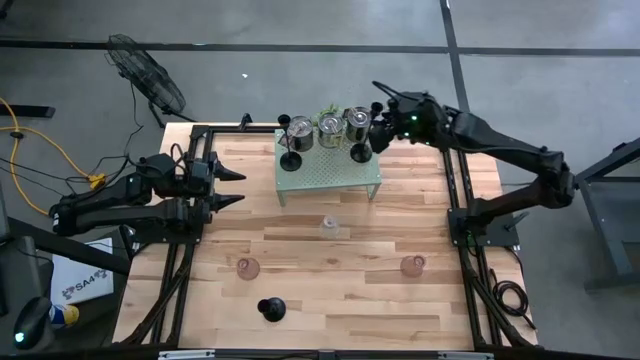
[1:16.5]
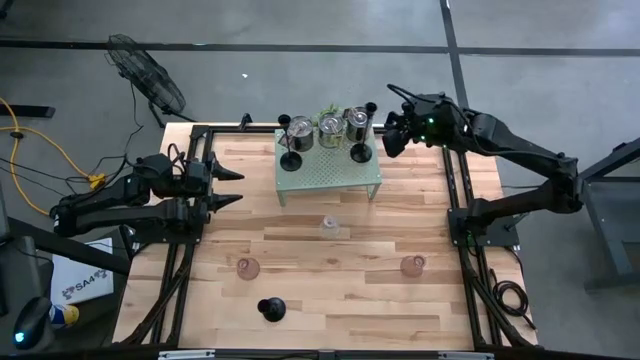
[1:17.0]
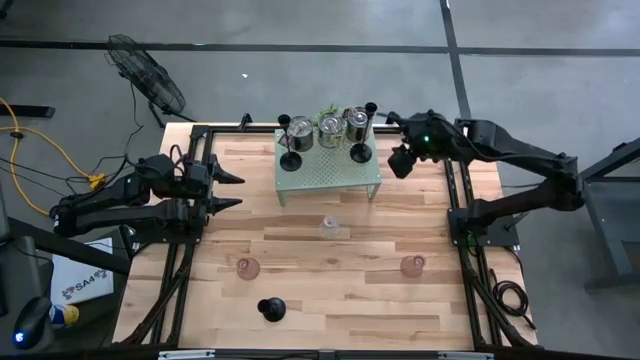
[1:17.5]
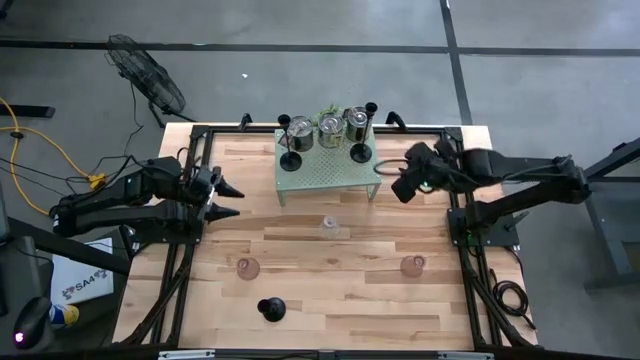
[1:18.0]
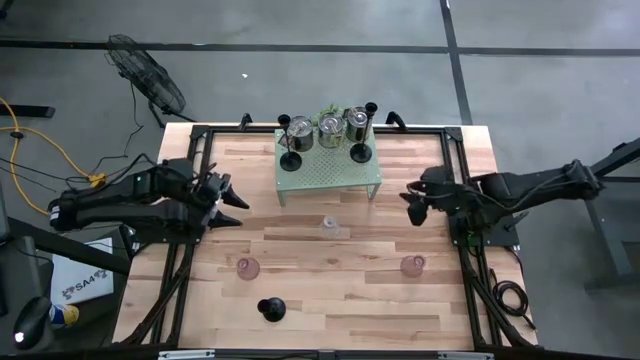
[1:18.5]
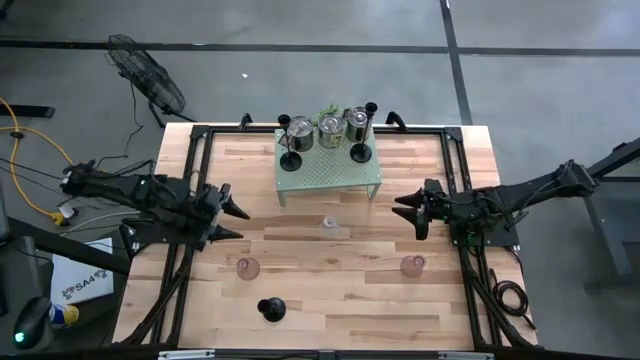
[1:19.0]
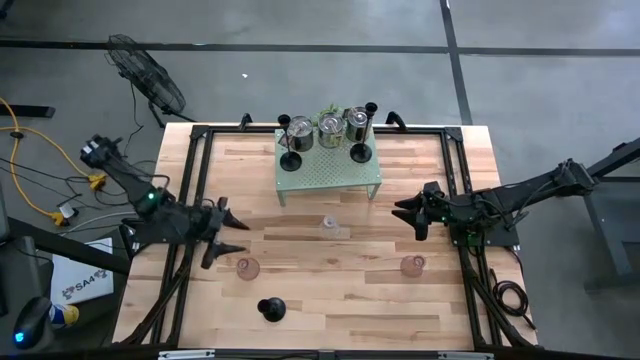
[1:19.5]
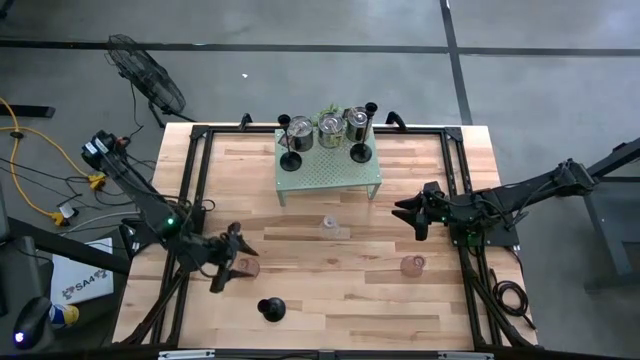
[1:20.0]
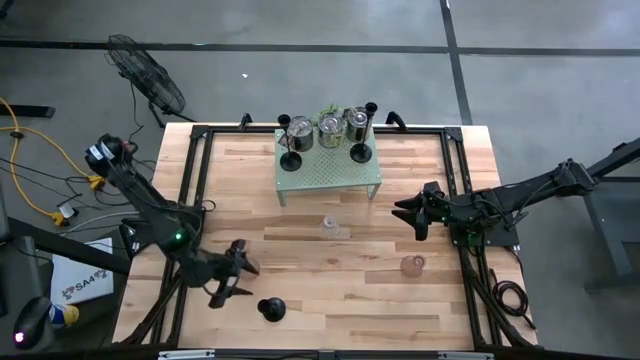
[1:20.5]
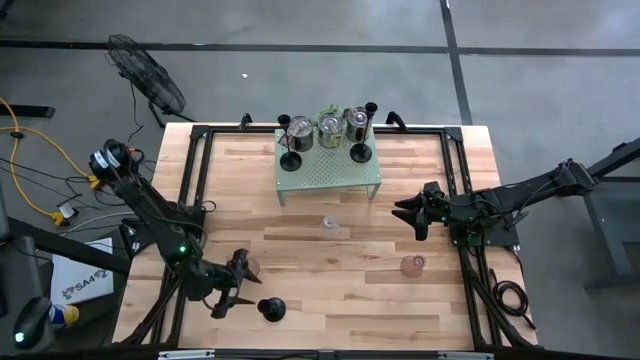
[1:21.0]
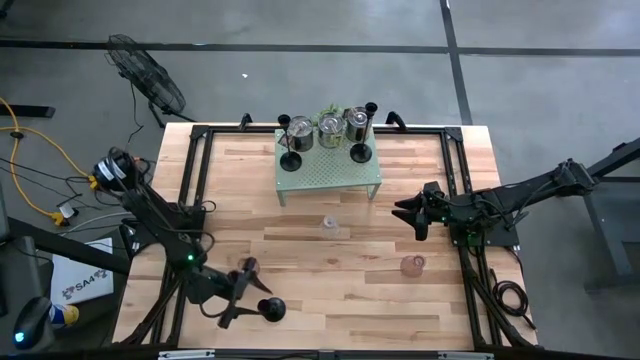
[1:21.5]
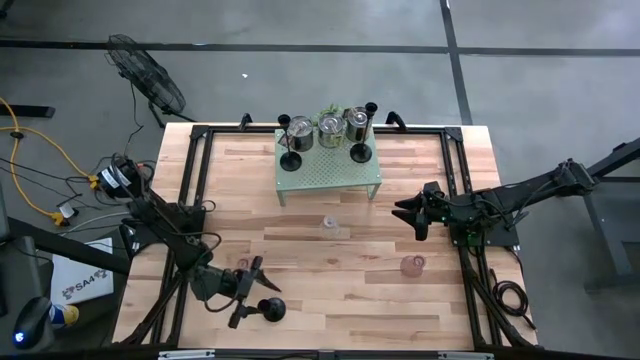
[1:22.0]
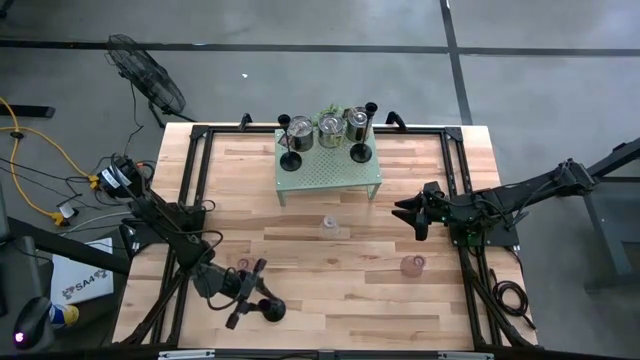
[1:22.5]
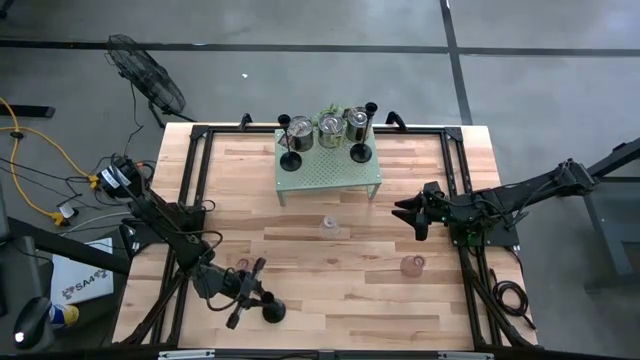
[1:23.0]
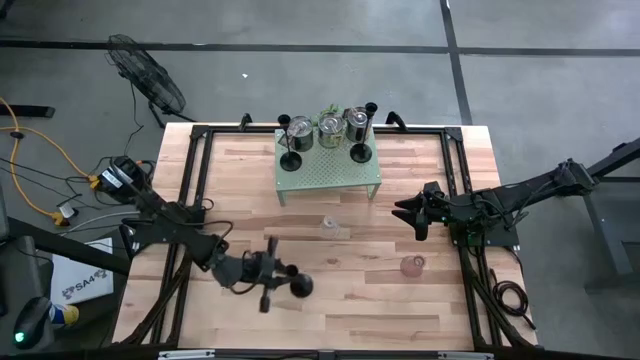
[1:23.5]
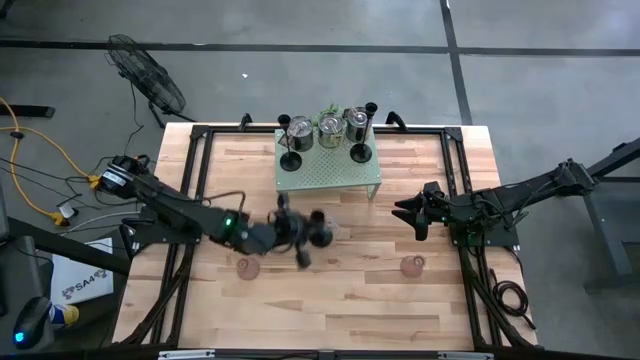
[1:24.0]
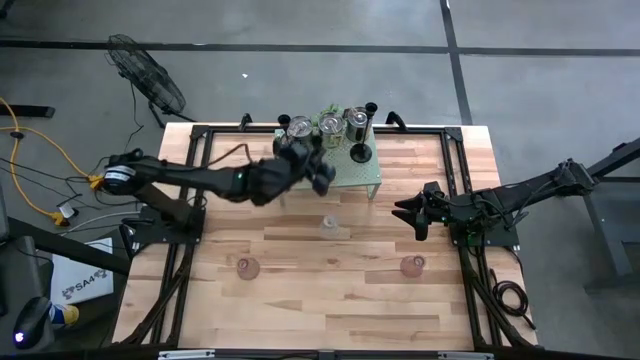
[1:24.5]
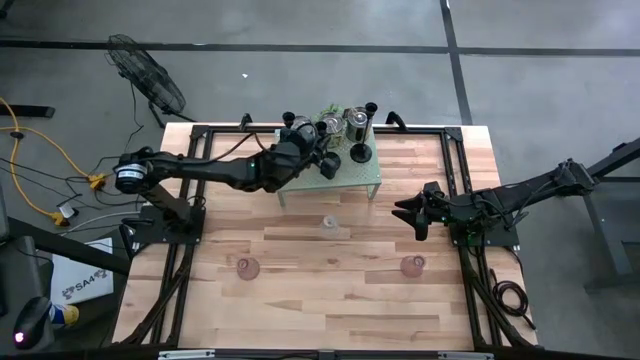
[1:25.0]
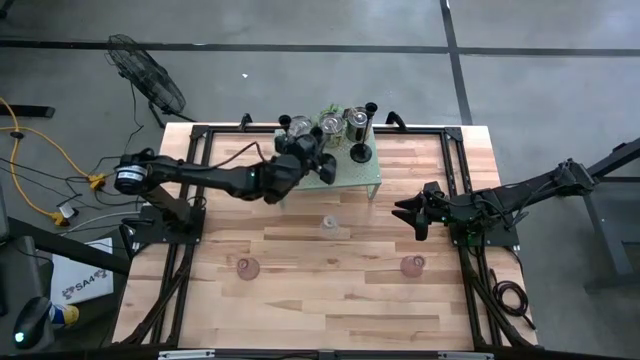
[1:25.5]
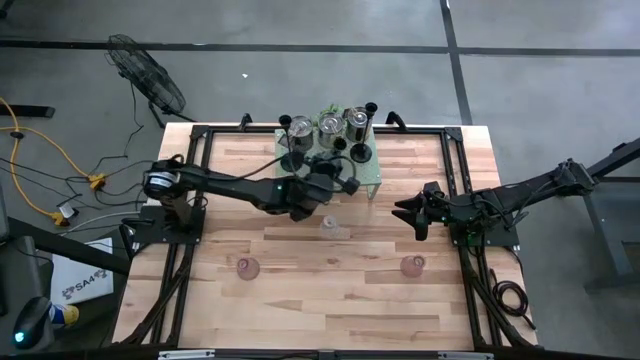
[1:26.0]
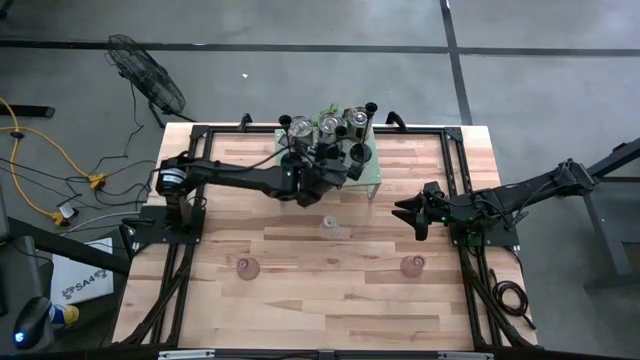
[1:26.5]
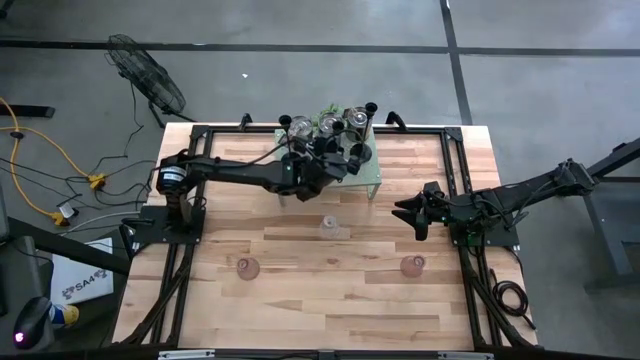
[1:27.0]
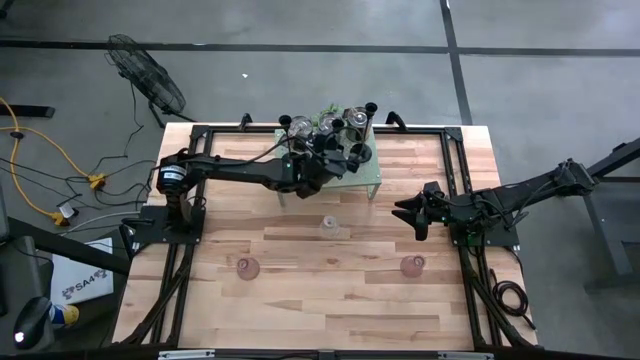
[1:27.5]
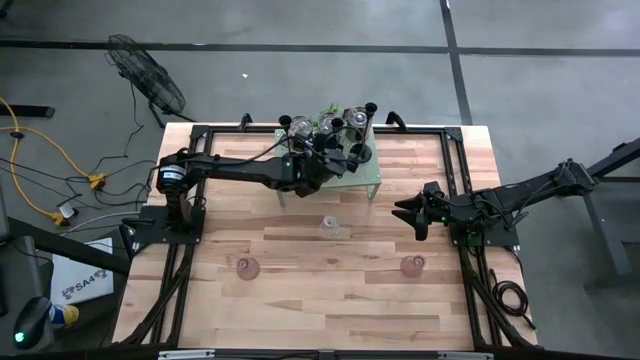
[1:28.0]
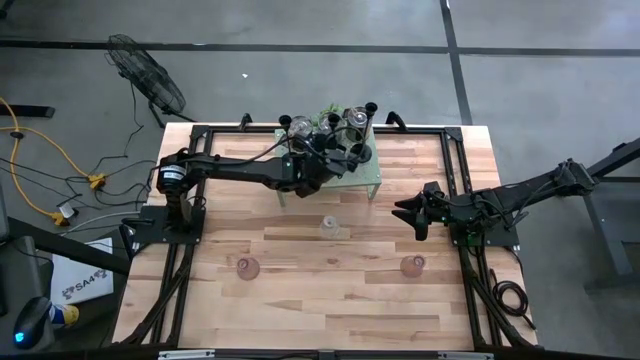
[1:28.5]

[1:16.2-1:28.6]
Task: Pick & Place candle stick holders
Put the black candle holder on the shelf aligned with the black candle holders

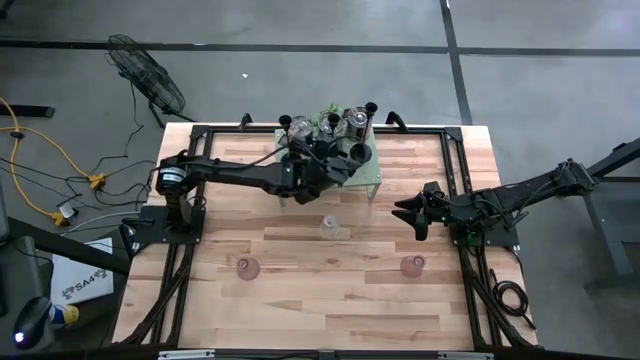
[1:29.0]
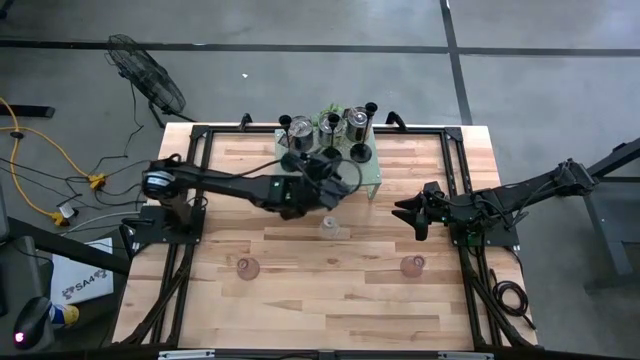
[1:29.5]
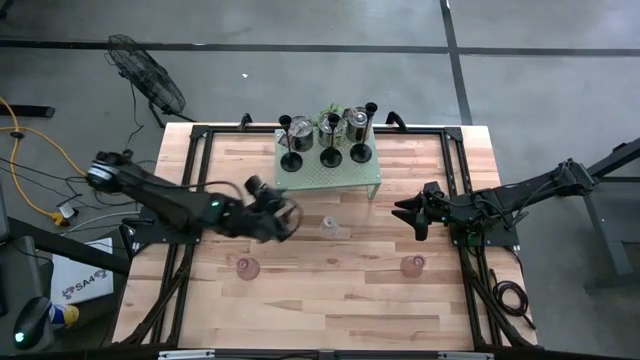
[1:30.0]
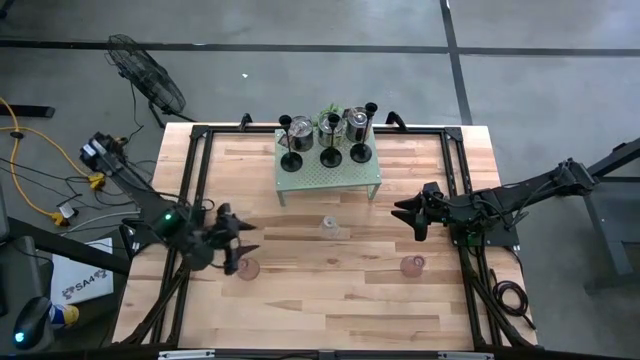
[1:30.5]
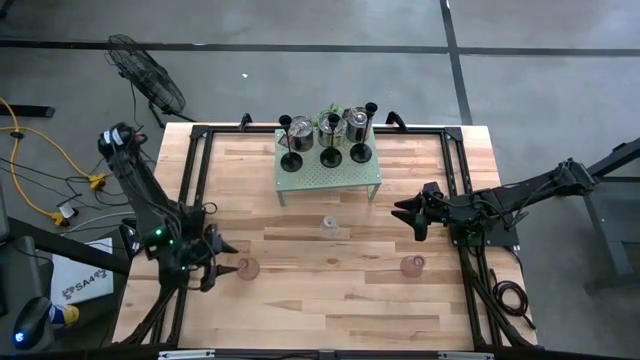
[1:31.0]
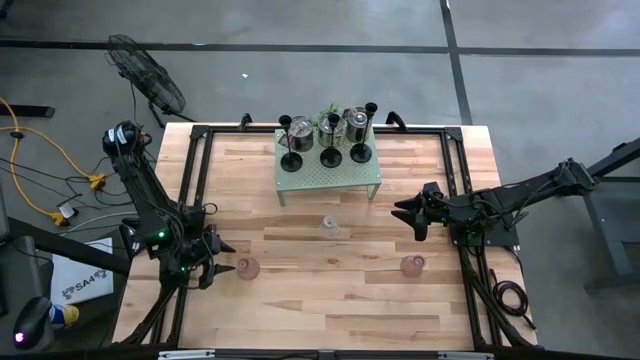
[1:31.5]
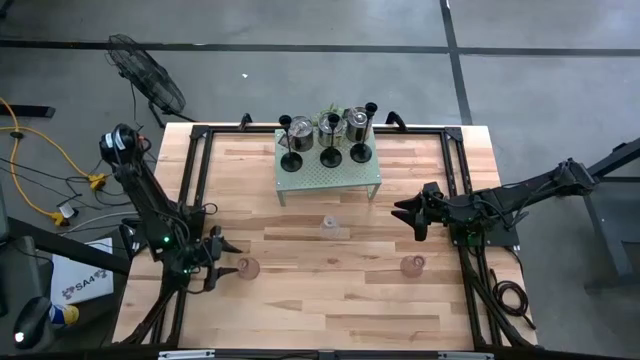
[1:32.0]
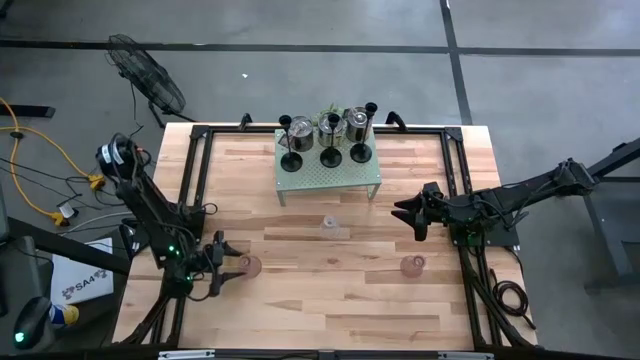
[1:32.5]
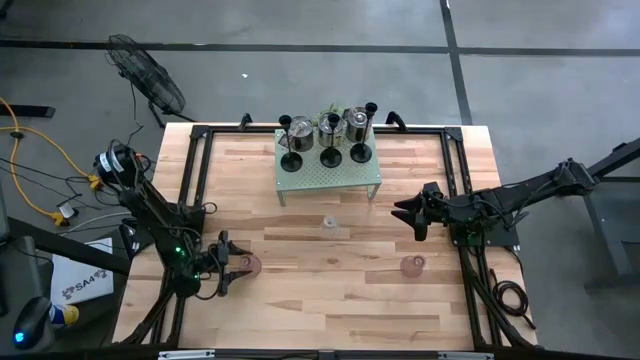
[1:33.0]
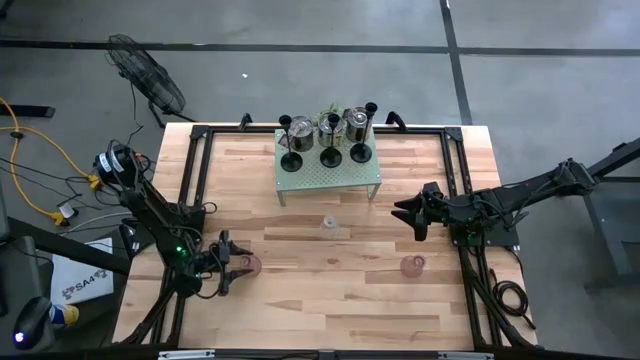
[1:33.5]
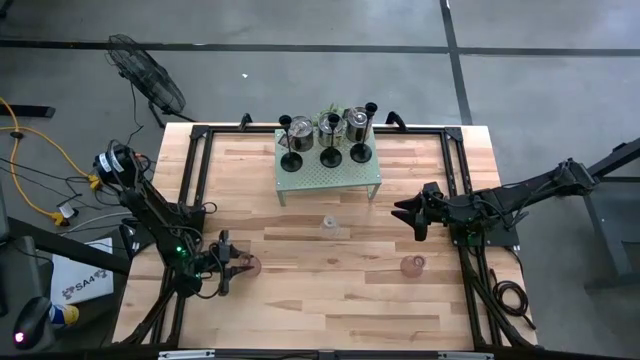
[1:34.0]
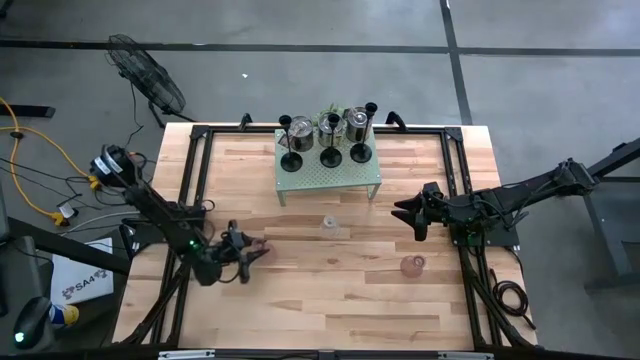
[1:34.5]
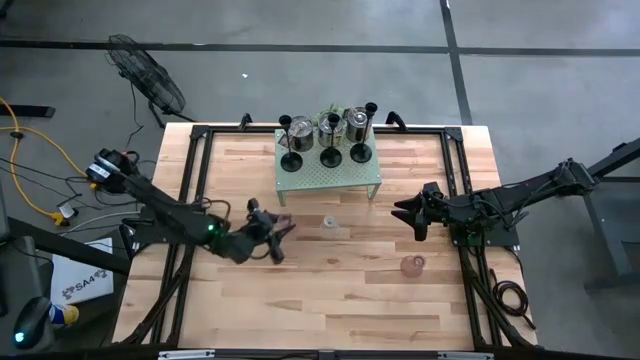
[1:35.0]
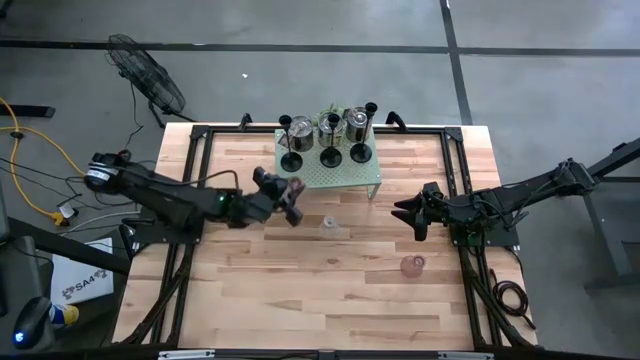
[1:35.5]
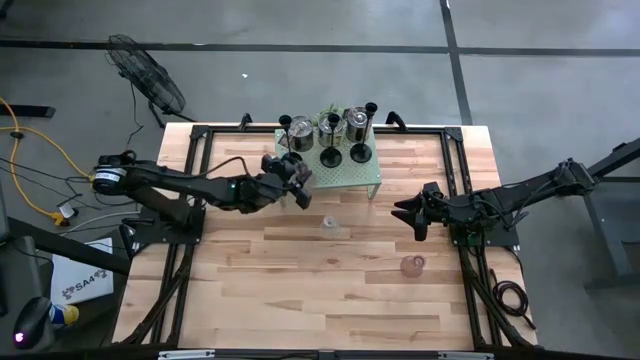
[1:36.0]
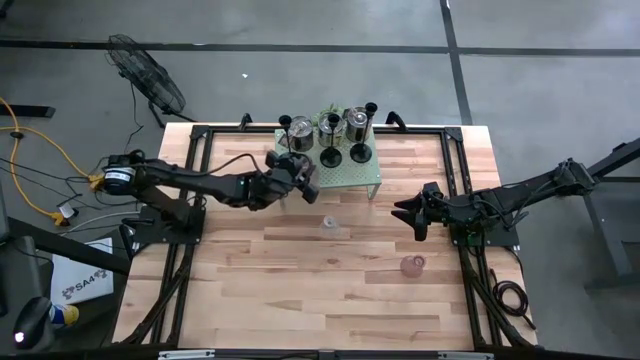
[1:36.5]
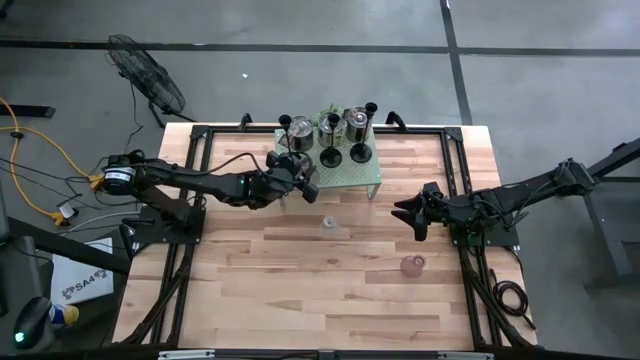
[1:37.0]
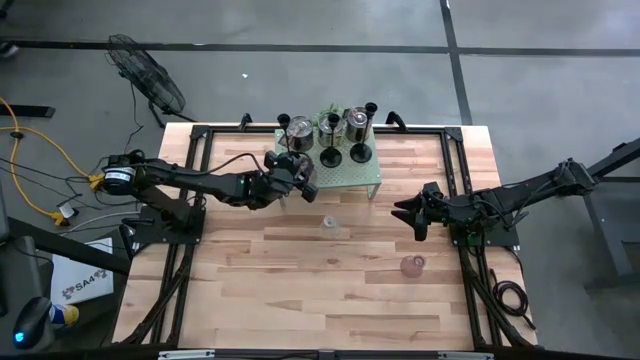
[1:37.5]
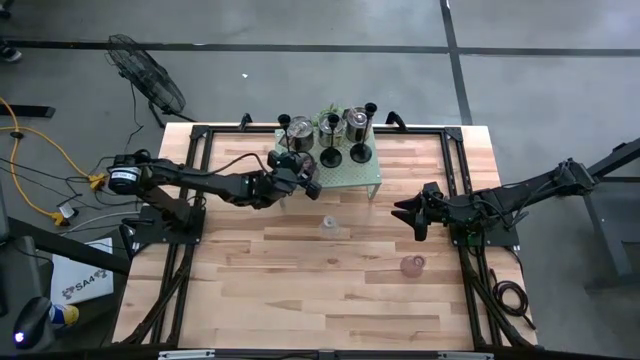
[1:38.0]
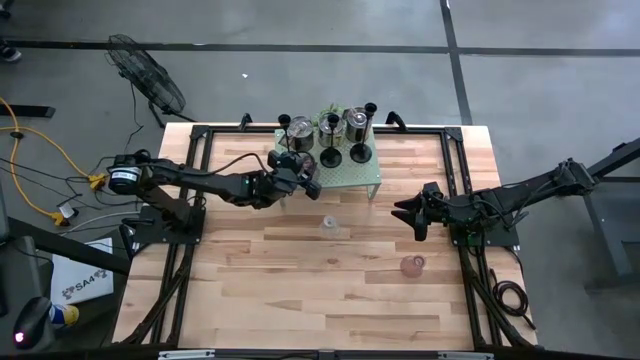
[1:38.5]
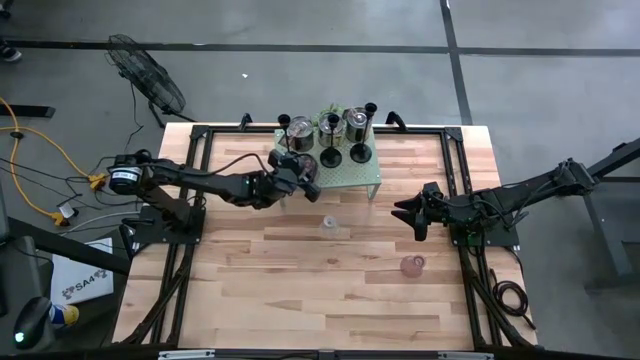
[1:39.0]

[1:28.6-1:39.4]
Put the left pink candle holder on the shelf
